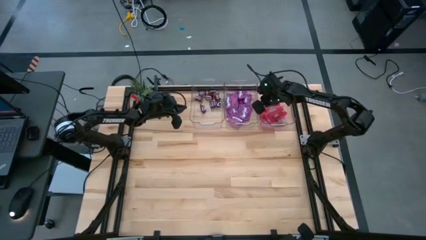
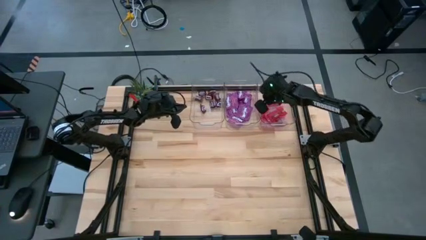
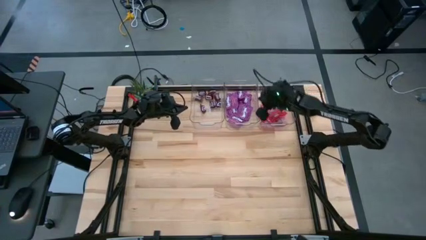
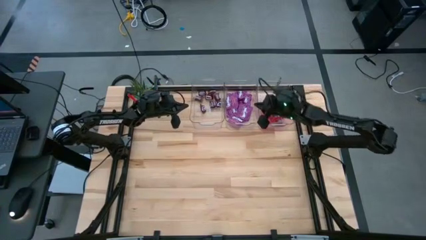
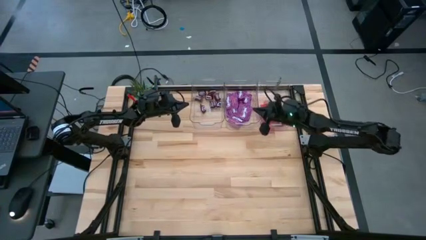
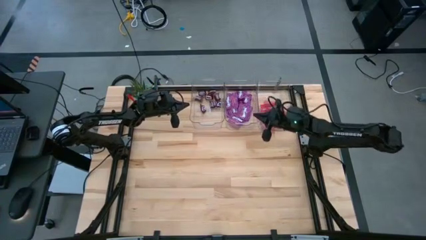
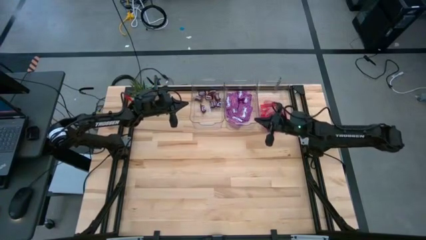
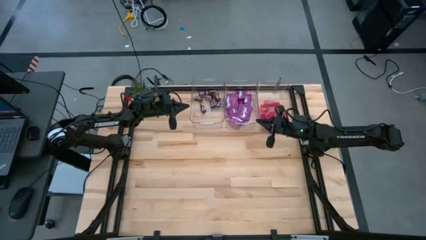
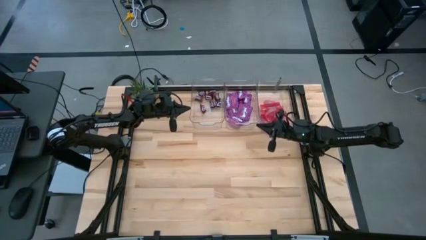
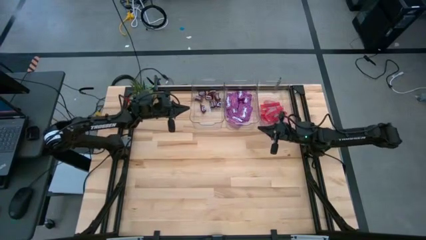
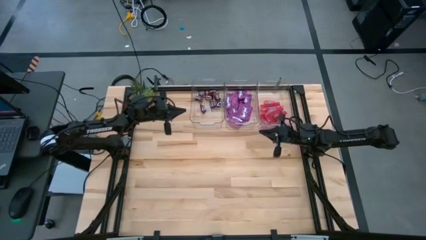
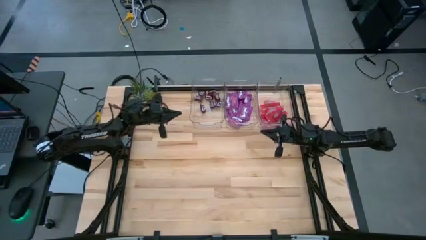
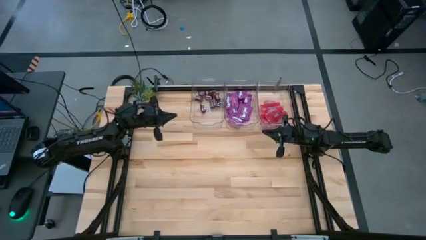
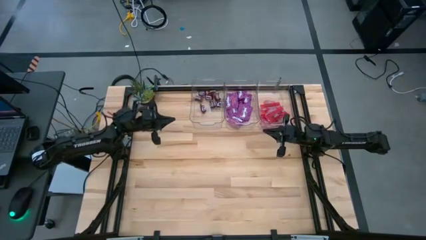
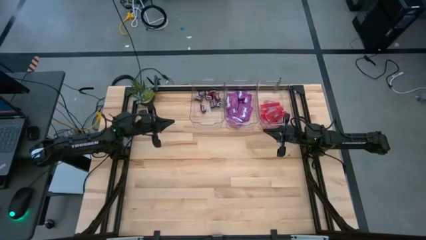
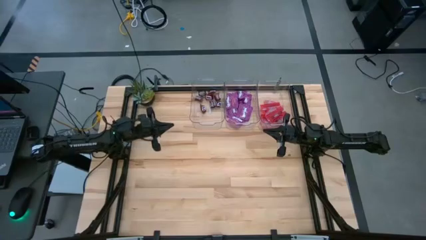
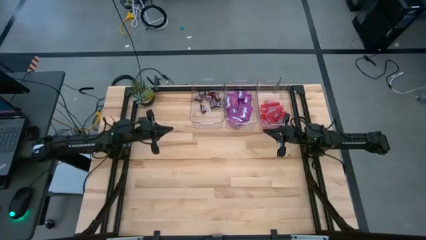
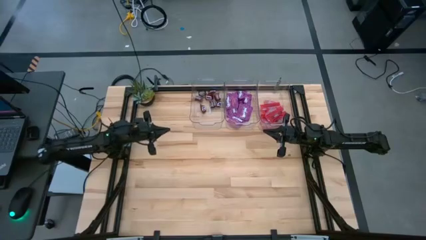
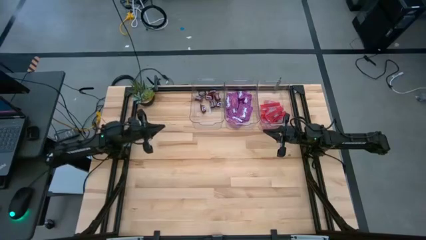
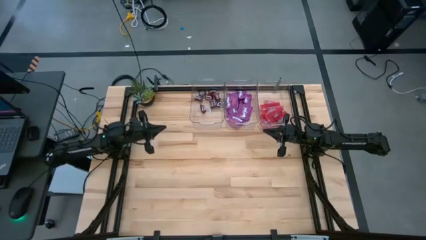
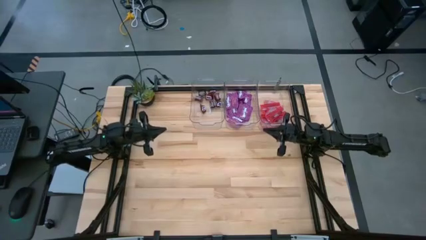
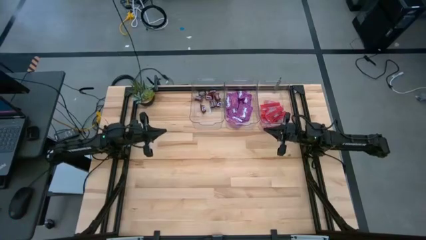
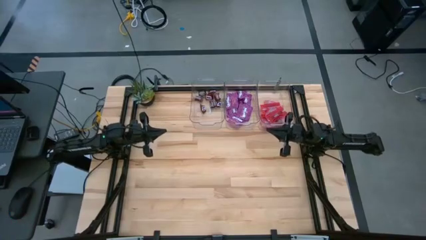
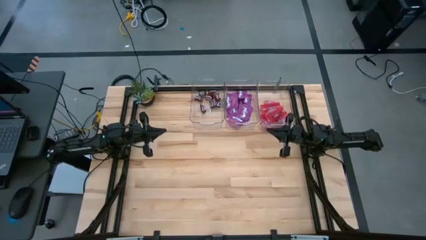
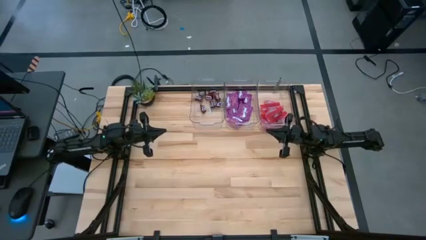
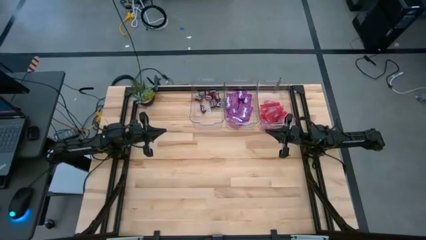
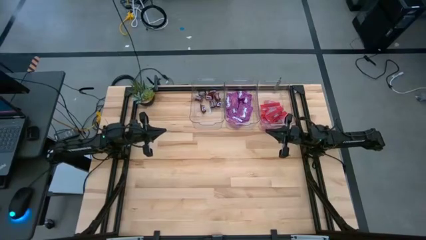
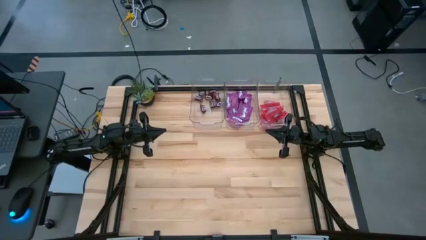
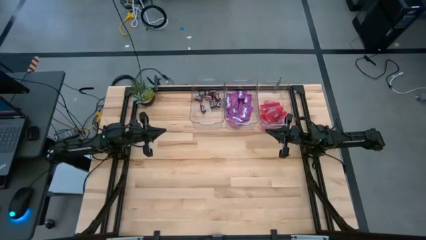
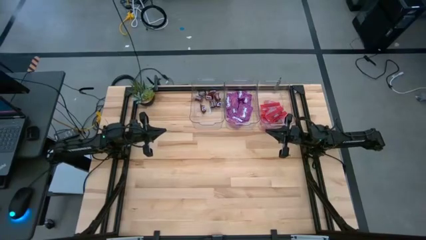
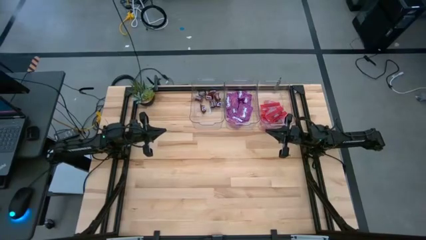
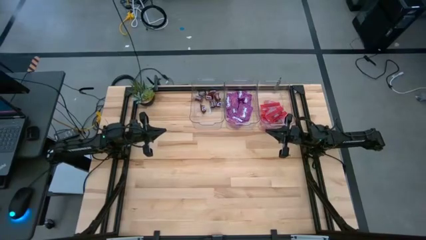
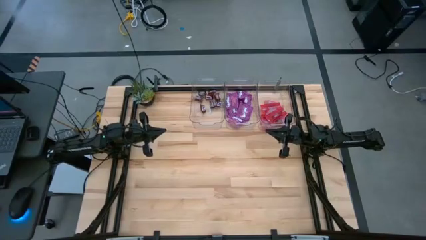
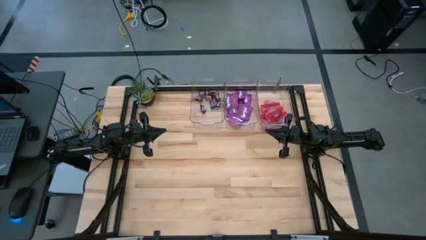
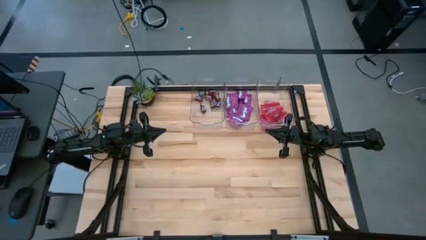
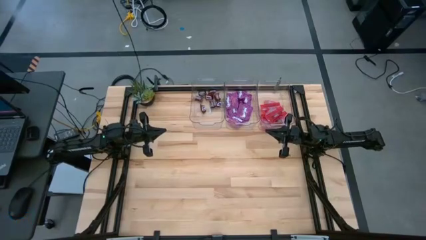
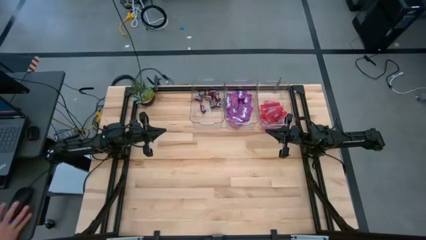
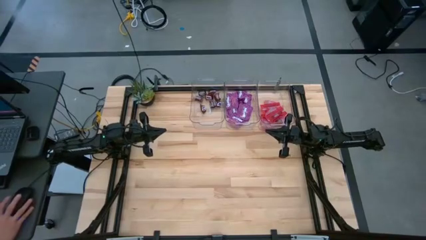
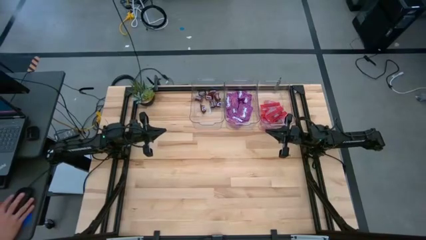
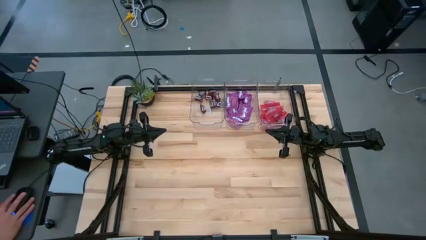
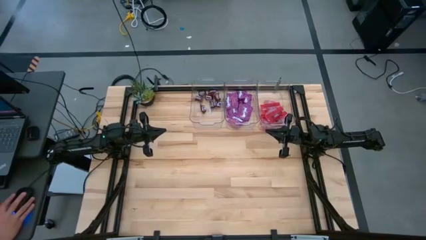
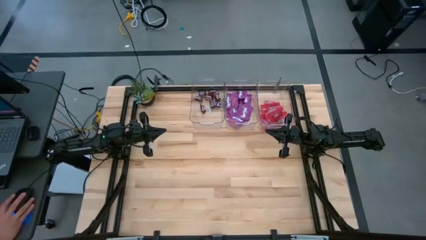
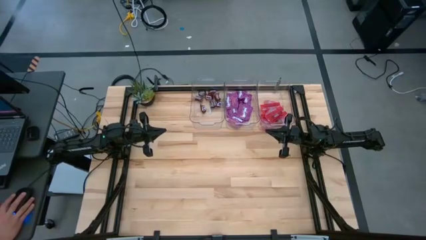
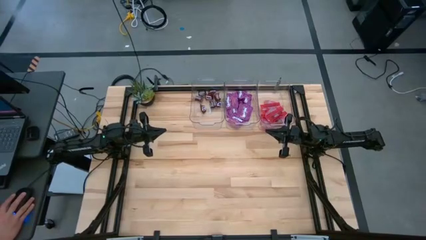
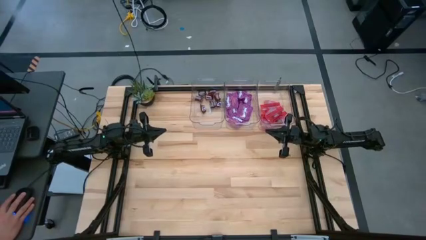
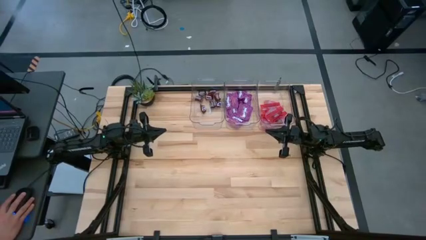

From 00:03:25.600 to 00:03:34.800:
Task: Sort candy
Return to Home Position

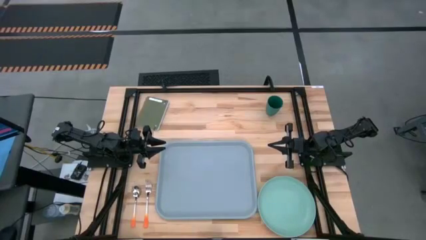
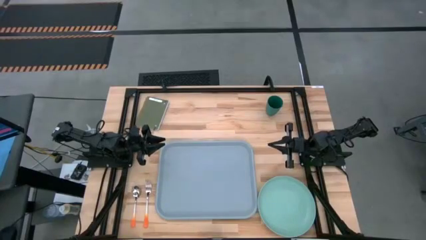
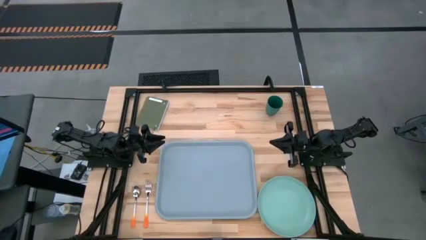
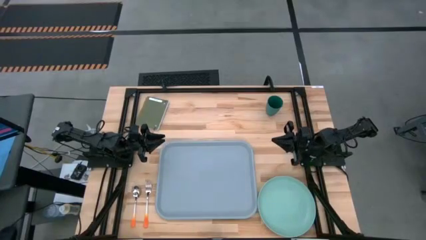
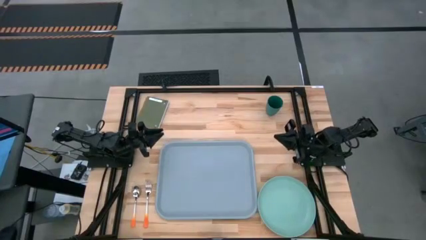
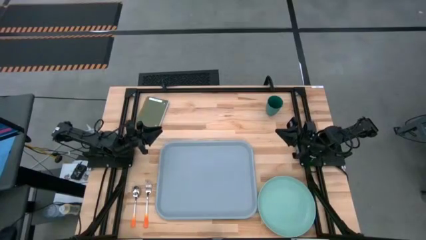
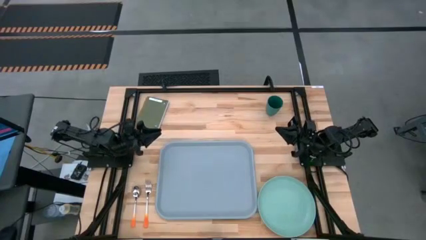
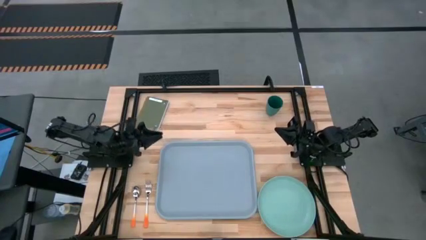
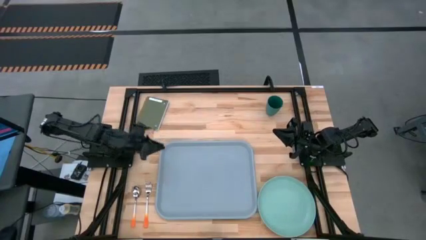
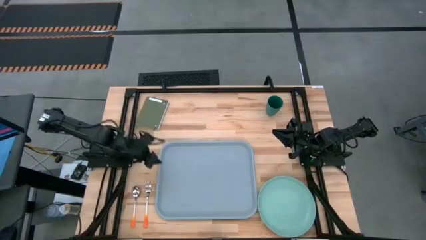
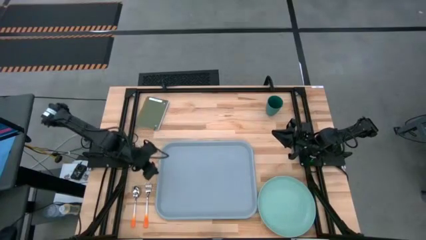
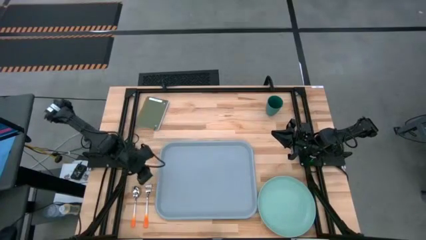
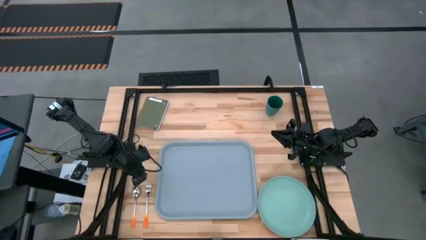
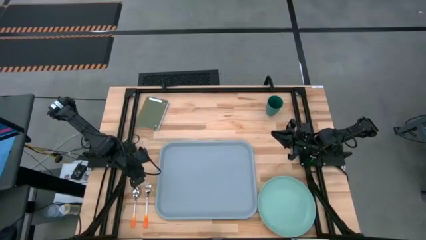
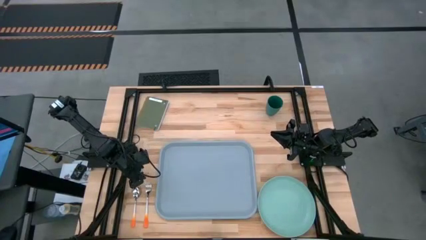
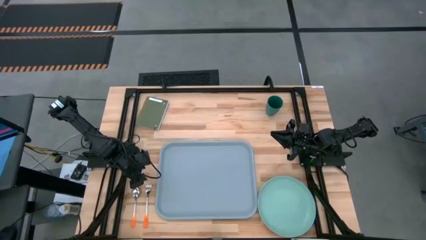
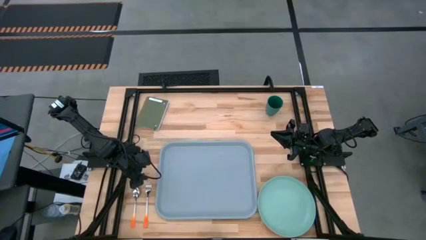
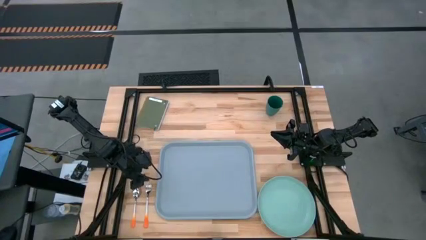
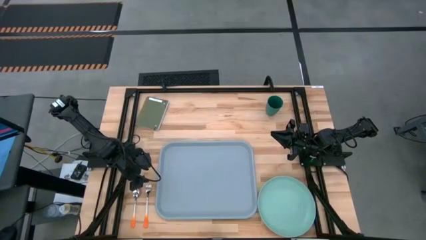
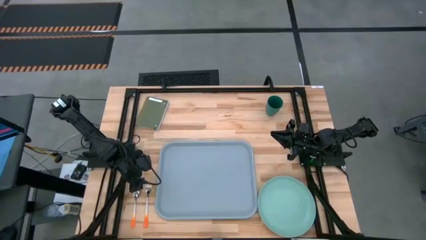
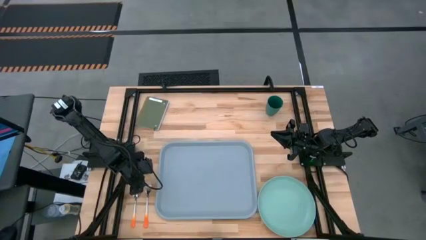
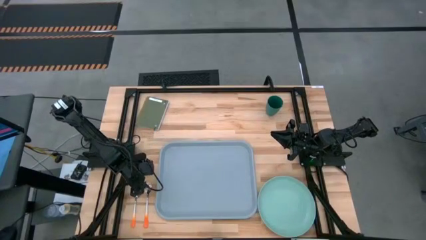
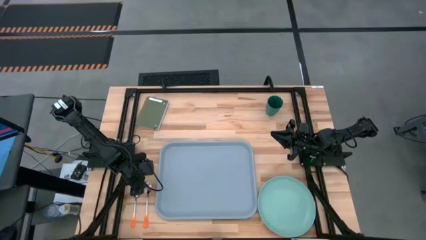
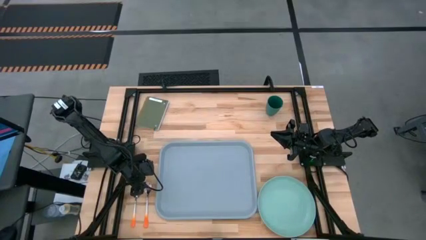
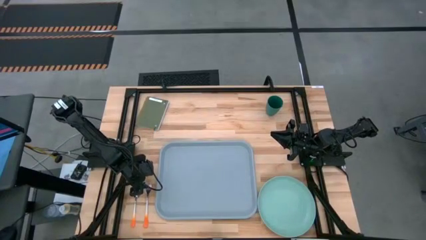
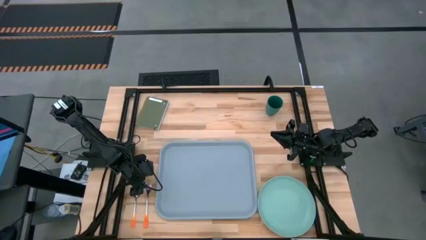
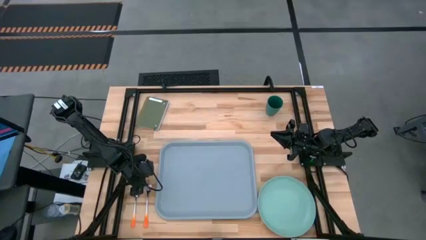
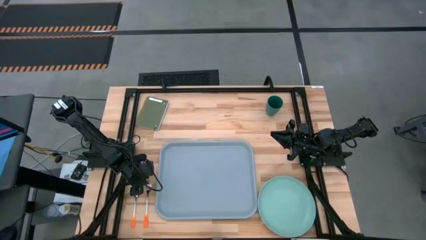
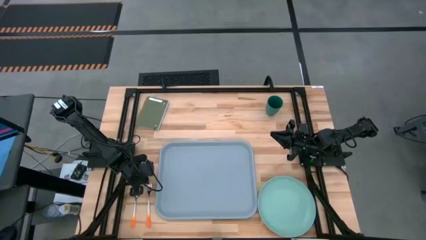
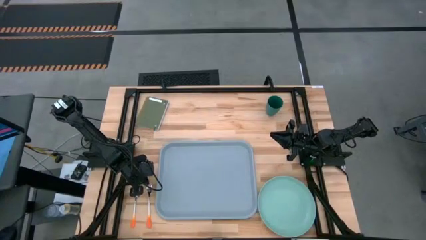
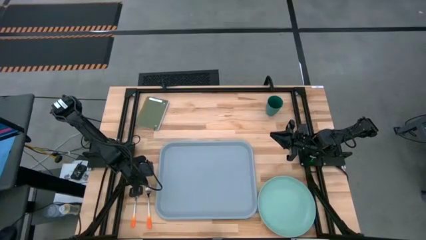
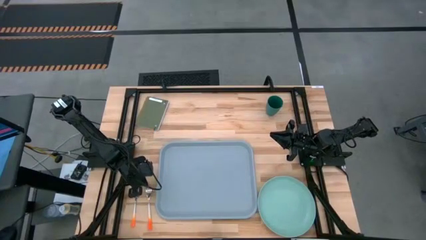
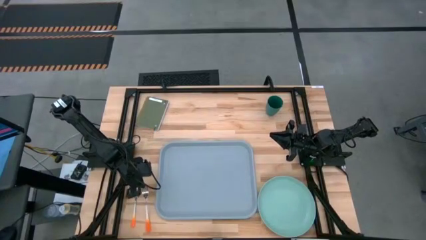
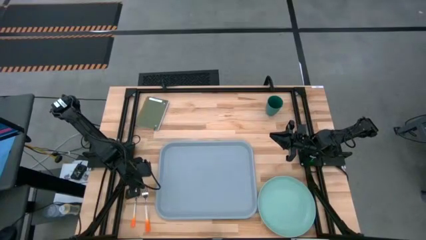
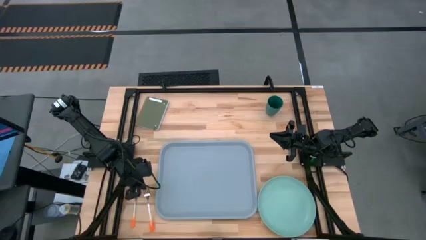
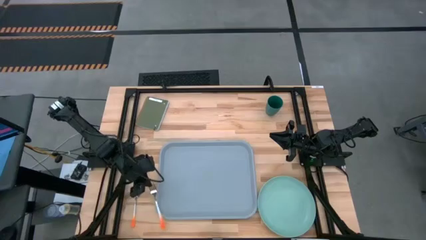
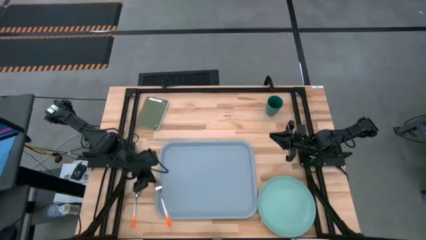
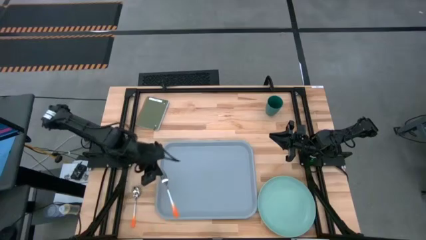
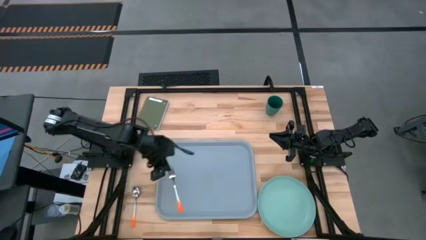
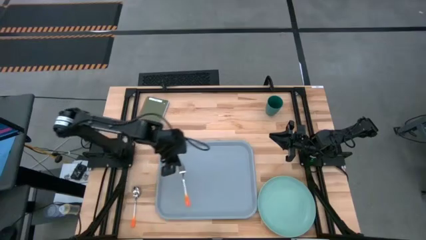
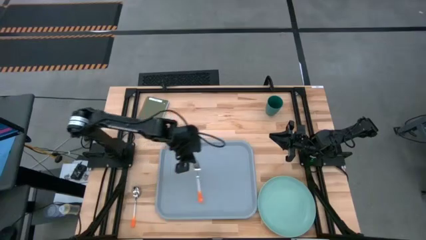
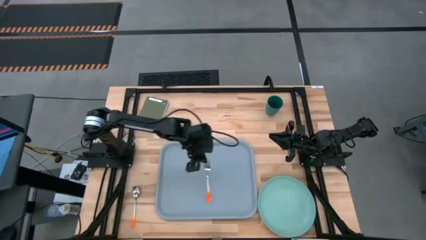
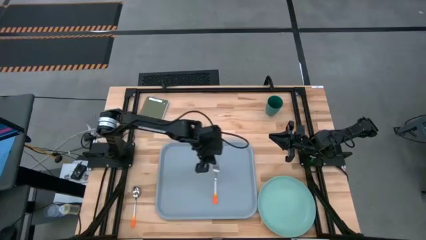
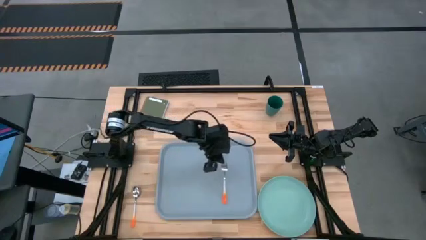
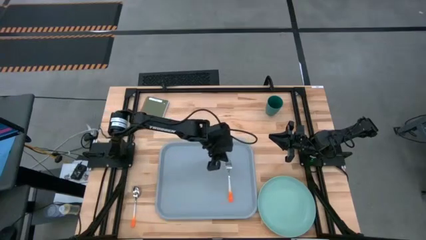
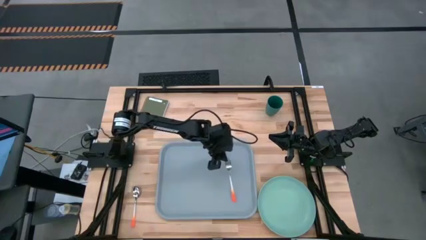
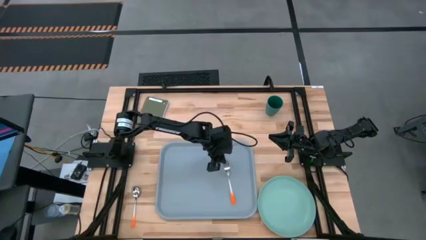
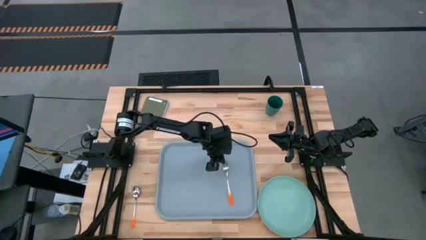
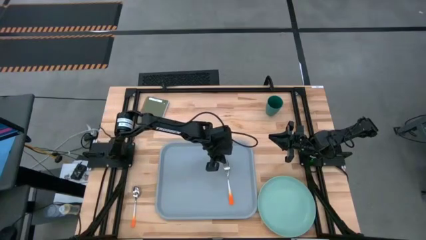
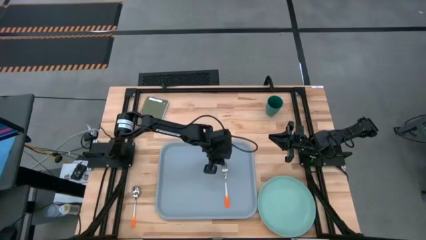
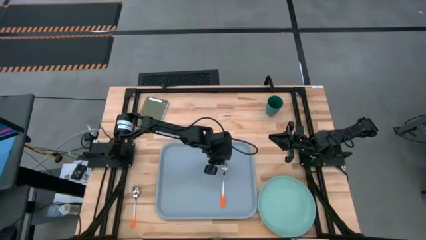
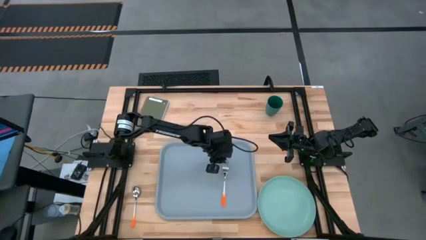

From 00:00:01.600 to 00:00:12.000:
Task: Pick and place plate/cup/fork/spoon on tray
Put the orange fork on the right on the light gray tray
